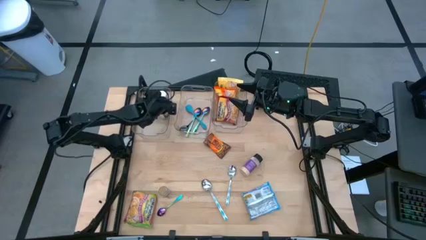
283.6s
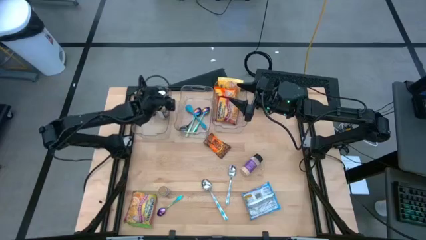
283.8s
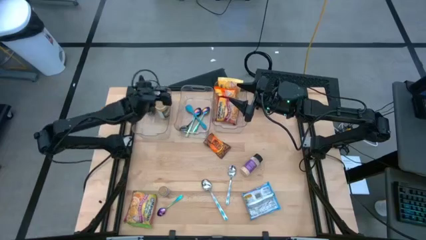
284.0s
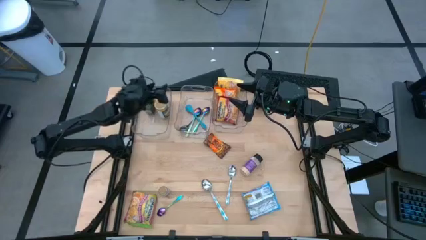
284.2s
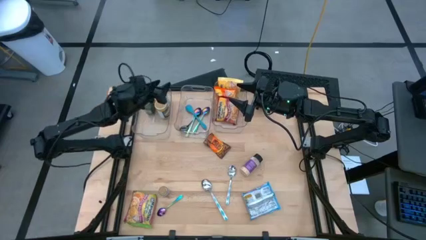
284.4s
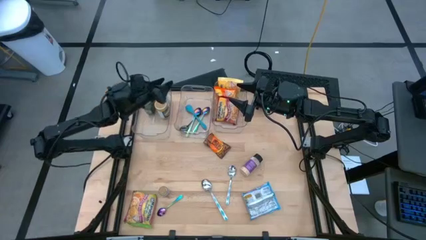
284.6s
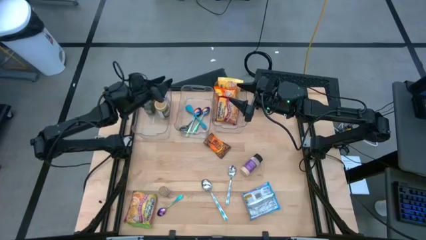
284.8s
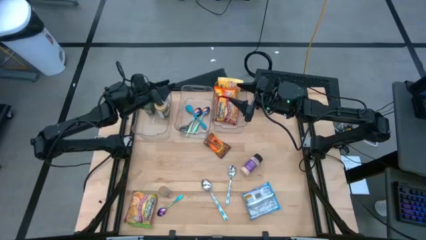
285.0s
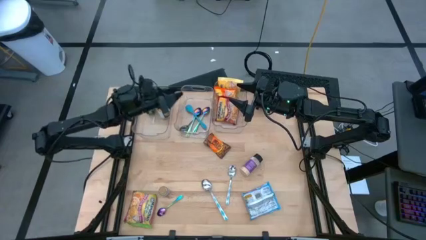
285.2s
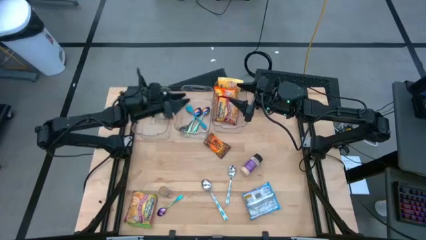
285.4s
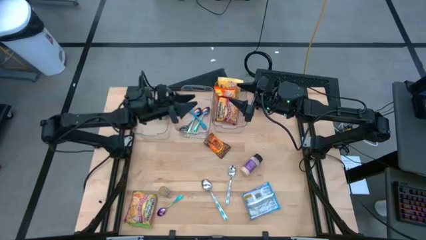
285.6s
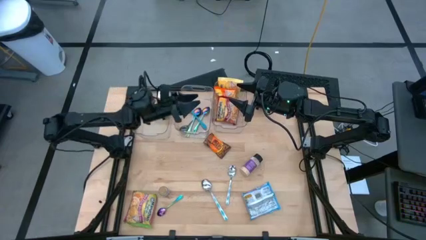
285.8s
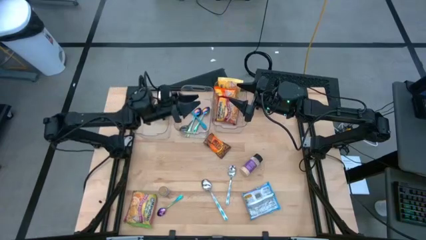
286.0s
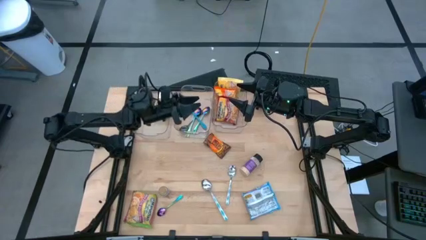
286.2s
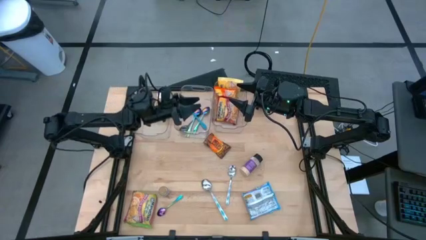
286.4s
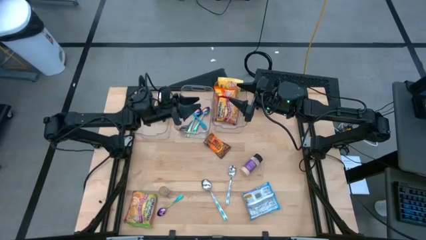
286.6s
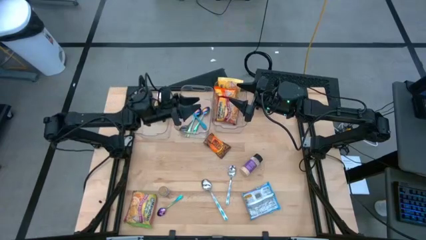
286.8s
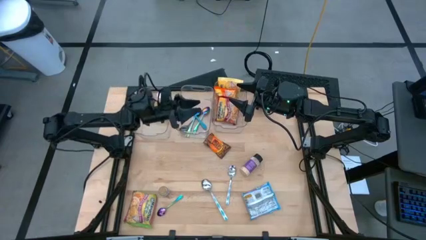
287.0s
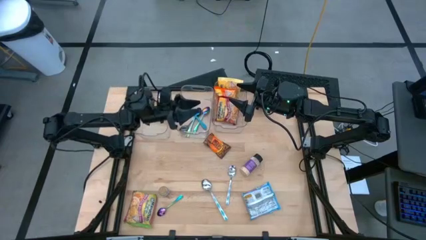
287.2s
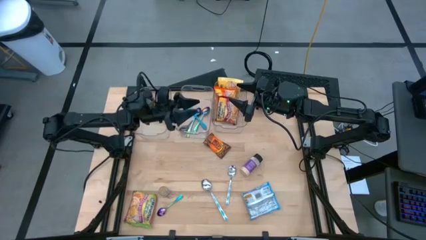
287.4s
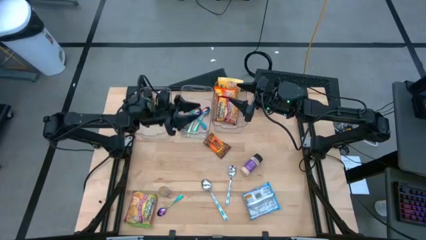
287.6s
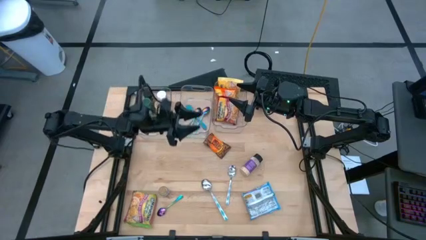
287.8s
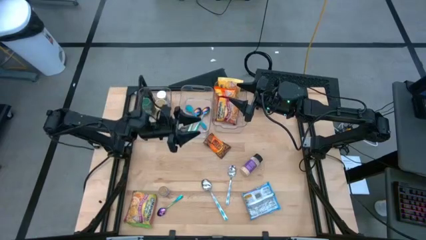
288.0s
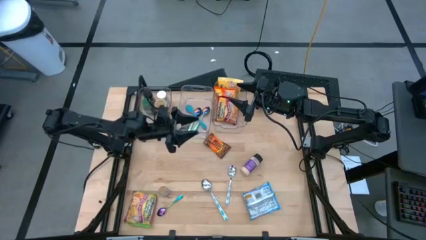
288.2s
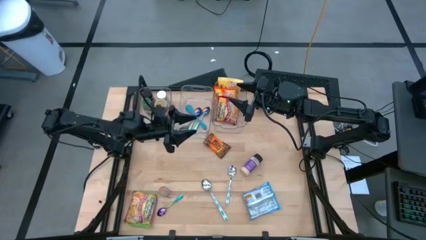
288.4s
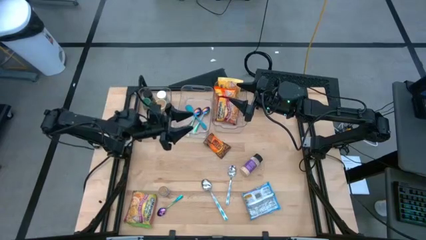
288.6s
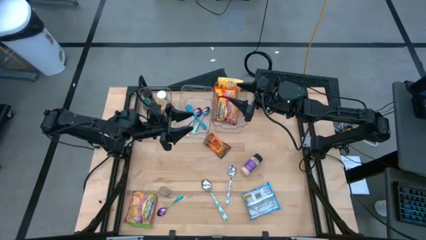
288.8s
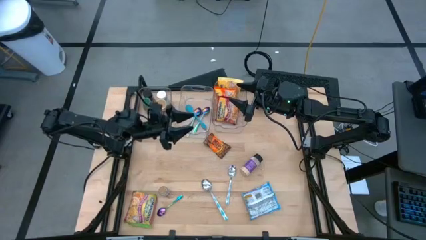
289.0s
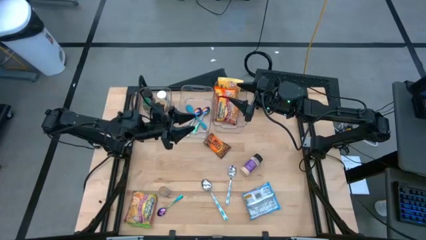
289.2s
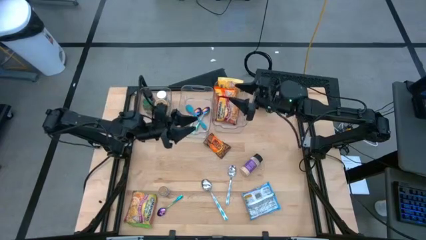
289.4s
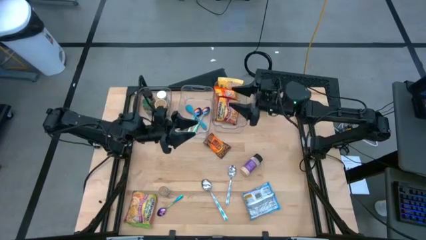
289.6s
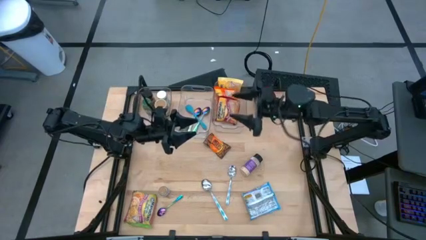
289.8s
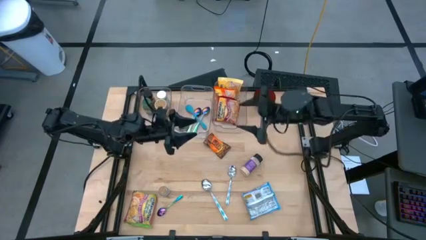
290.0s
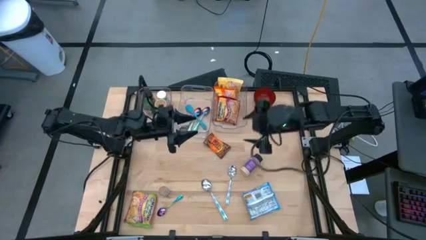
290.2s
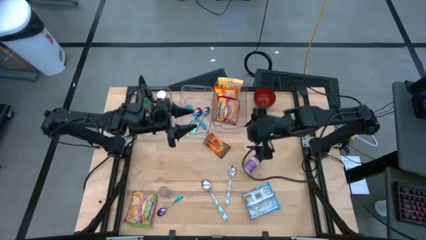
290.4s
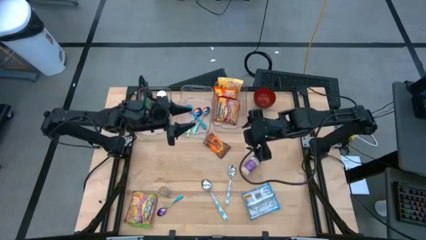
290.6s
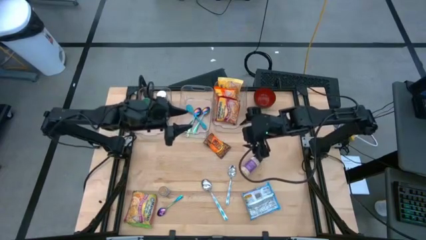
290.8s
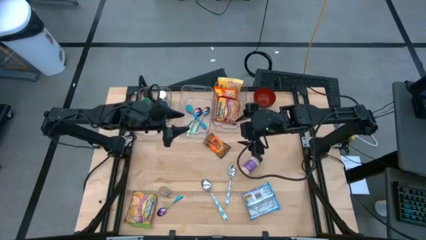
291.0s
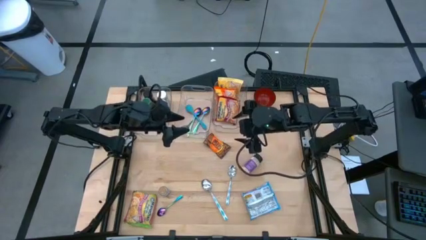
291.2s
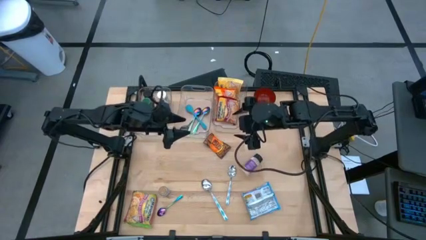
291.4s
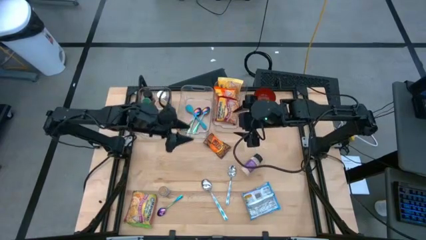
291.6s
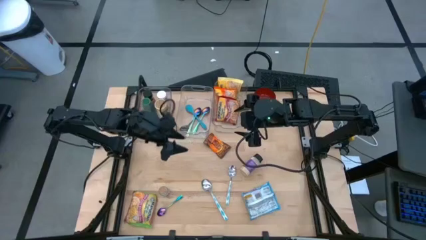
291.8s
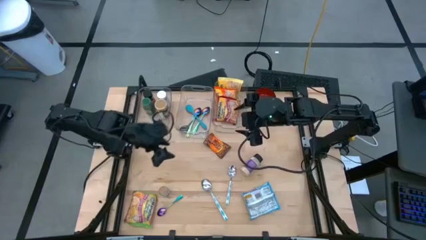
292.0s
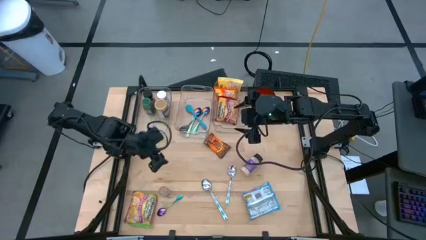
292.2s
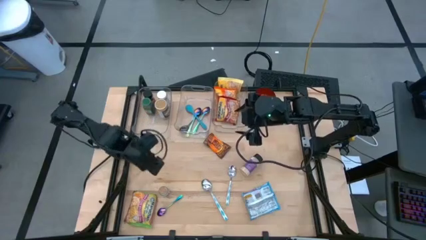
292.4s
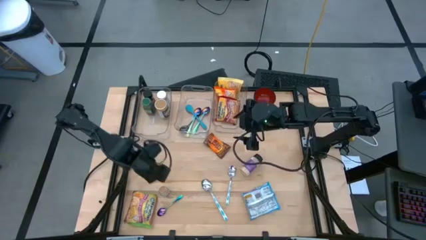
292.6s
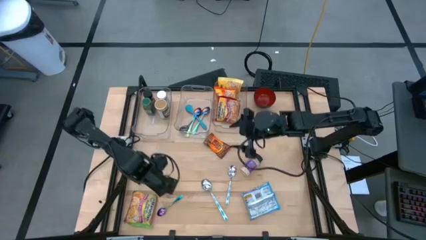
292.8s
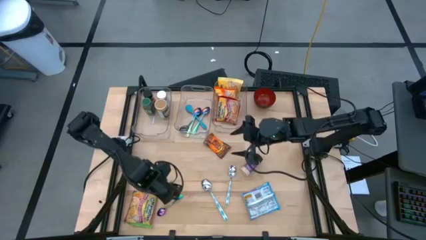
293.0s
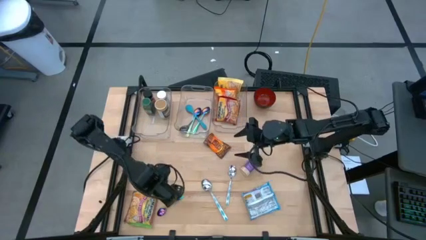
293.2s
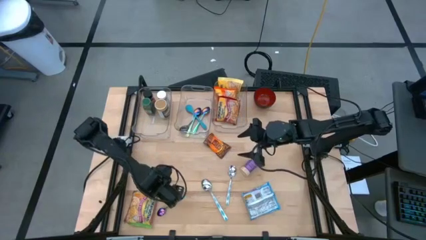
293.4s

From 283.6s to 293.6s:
Task: Pick & Place Food Item
Put the brown spice bottle into the left transparent bin

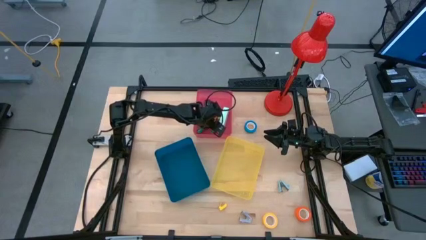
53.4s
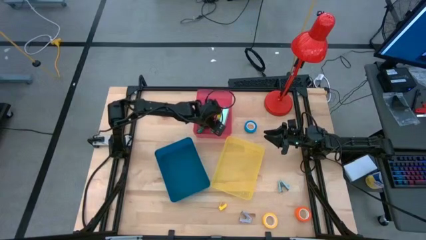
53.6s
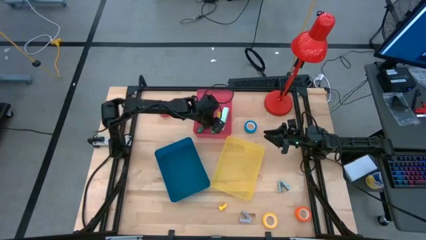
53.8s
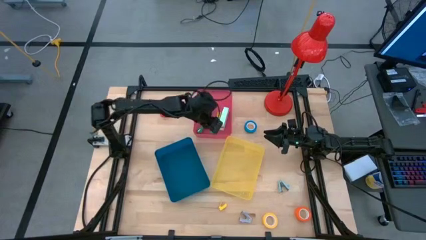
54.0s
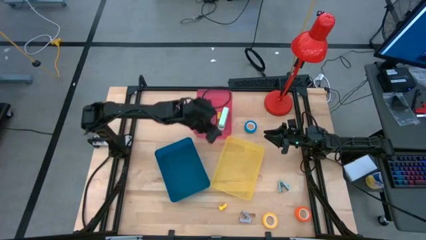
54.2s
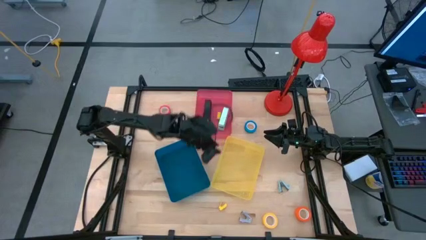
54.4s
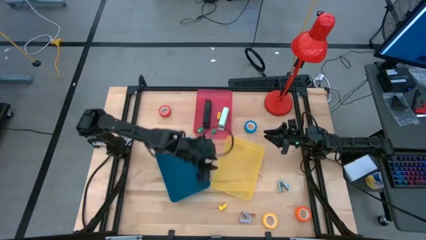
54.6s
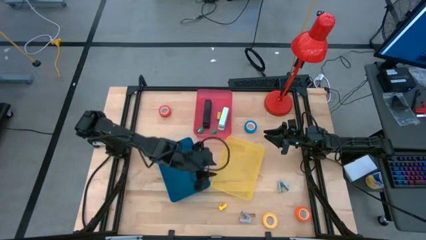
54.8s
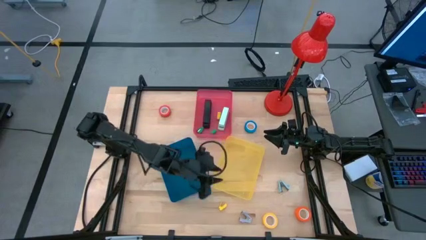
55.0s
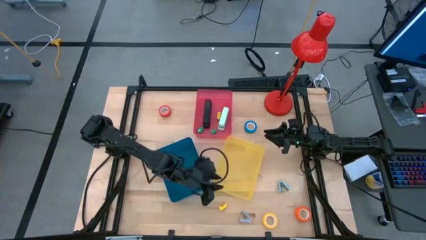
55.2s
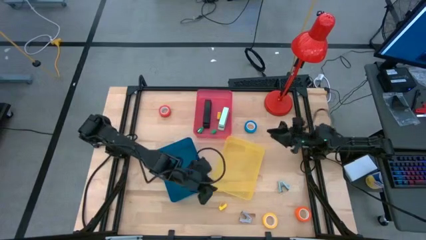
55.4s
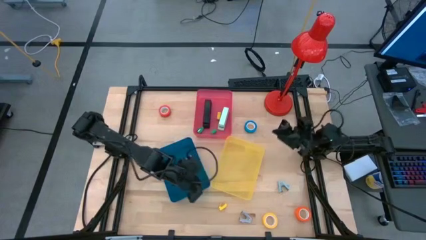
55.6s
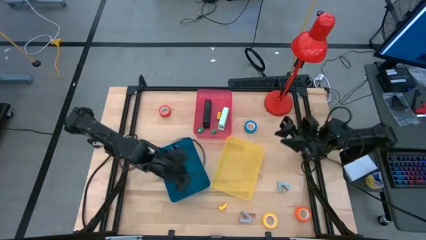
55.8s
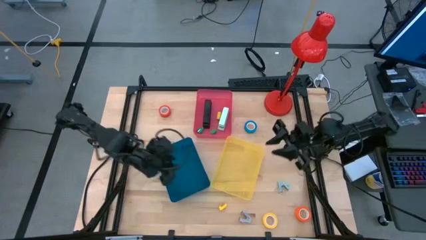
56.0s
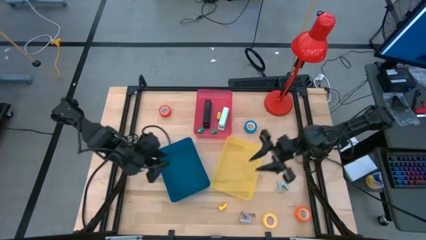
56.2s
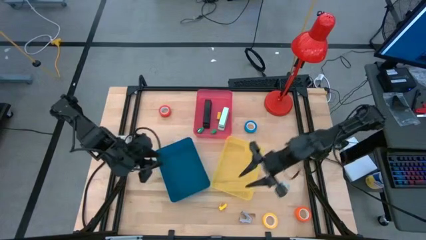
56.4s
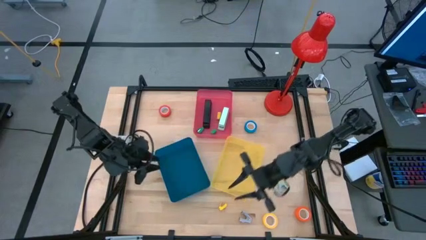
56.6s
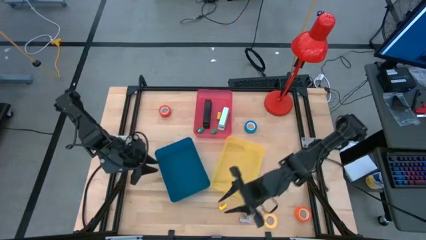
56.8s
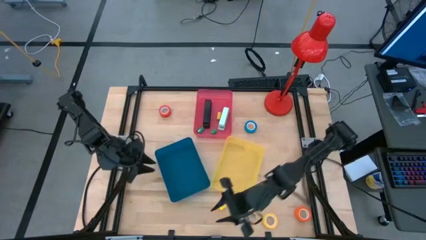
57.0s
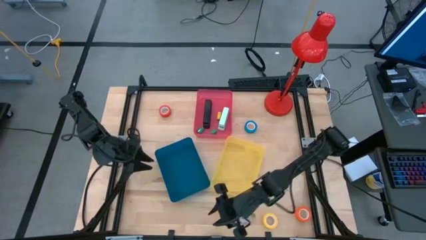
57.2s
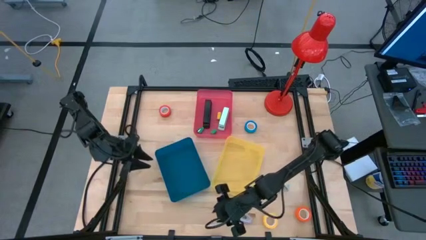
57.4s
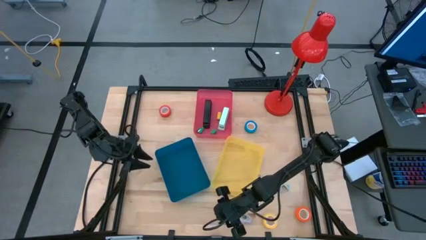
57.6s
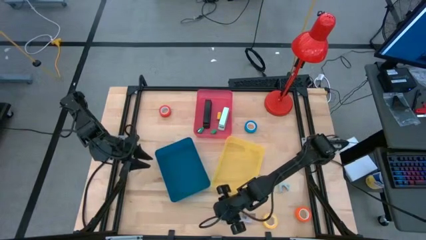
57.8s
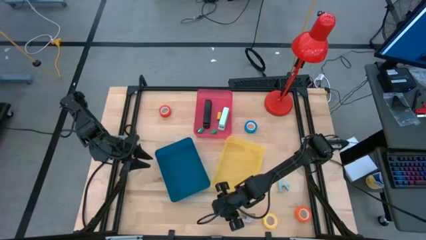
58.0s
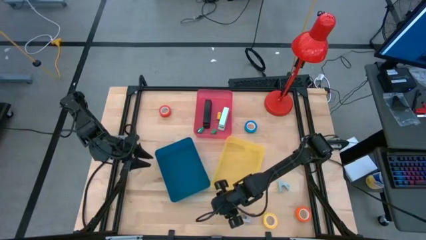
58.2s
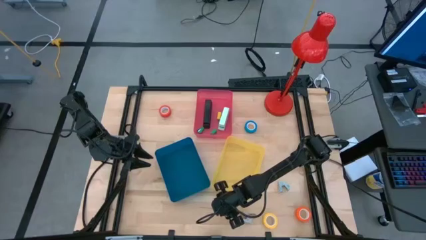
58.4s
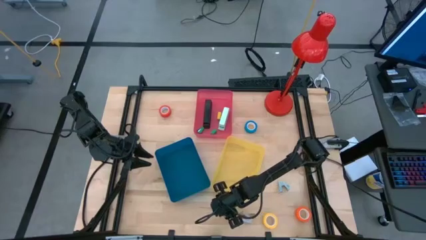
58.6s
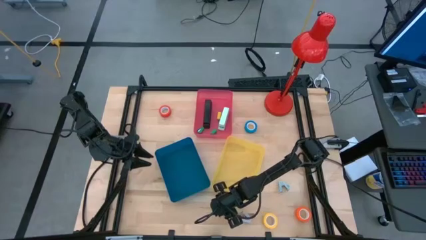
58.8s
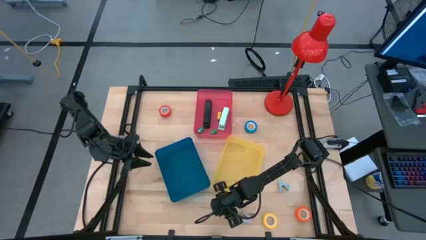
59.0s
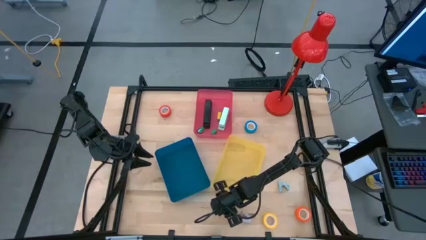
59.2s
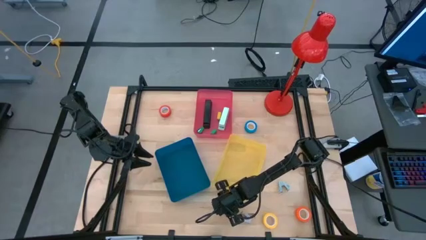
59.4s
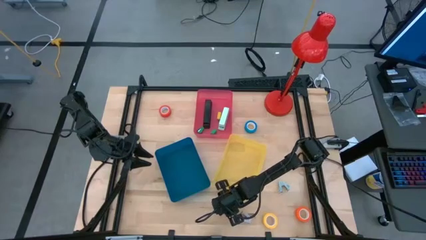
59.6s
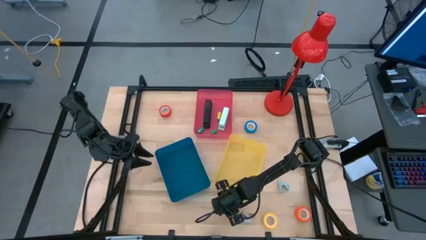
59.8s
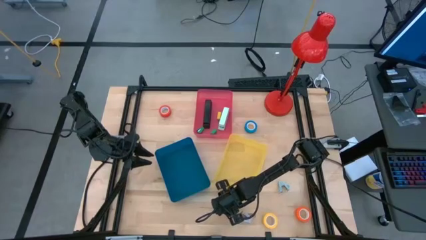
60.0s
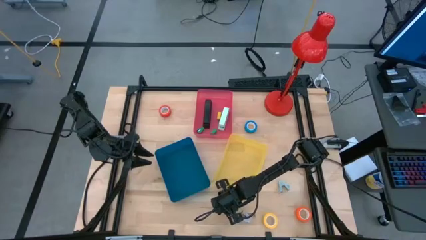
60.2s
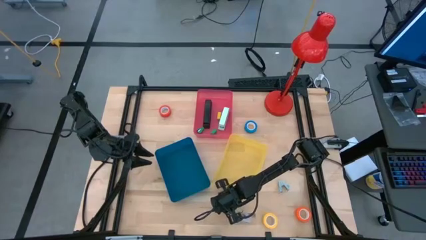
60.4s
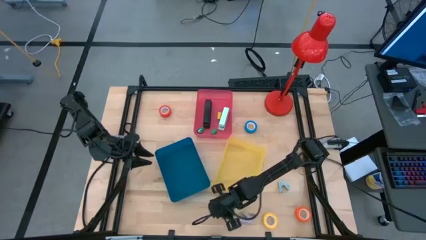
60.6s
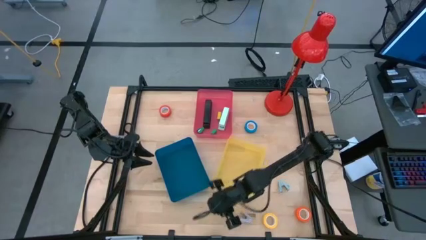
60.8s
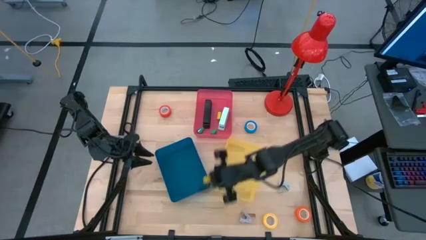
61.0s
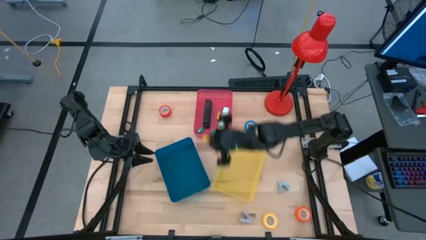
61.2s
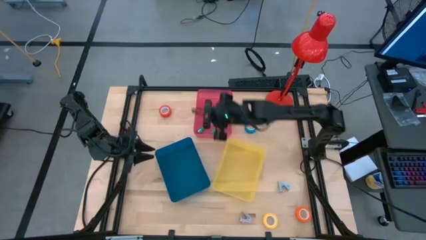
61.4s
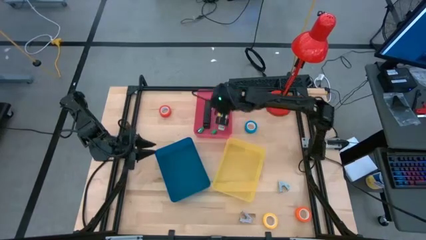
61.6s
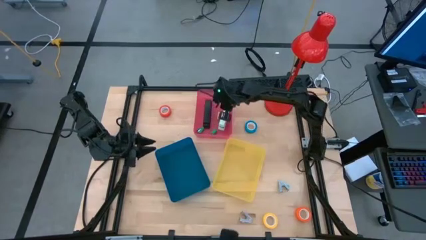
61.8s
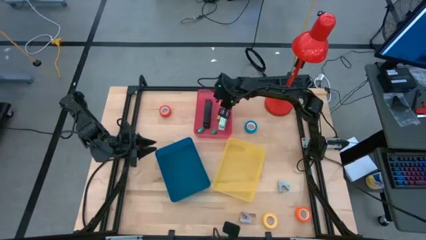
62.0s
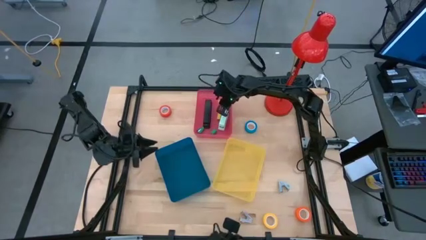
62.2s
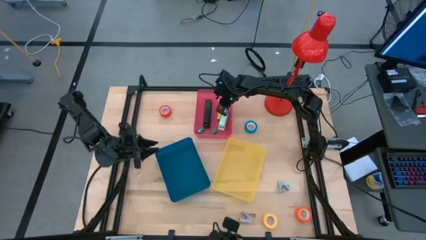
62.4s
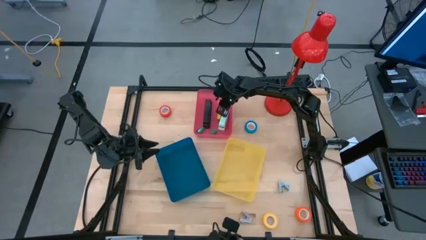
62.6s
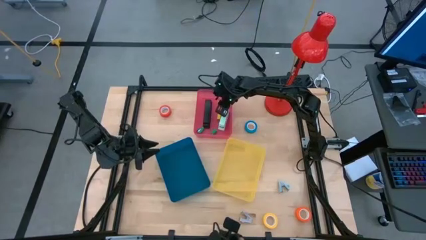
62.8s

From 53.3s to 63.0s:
Task: Pick and place Stapler, Stapler remover, tape
Put the small yellow stapler into the red bin
